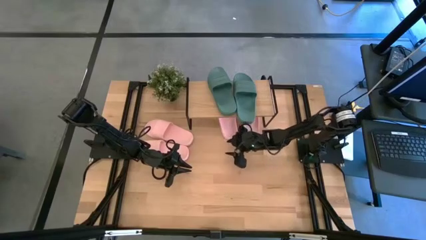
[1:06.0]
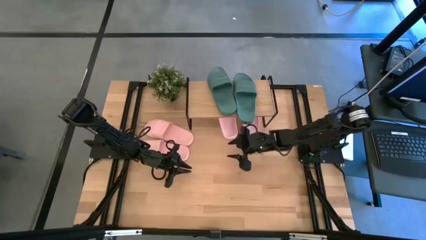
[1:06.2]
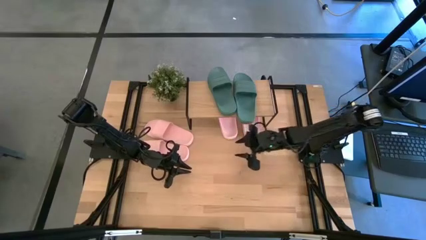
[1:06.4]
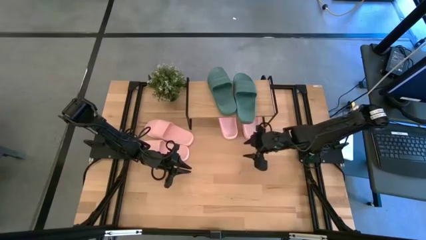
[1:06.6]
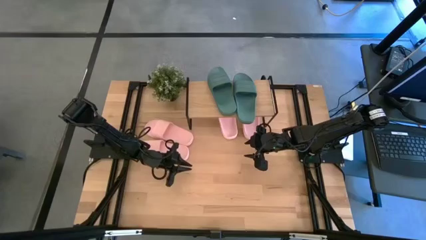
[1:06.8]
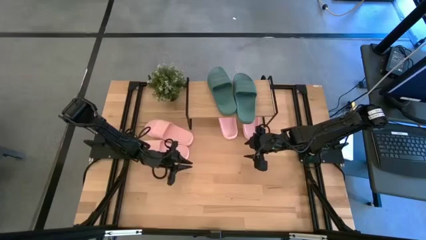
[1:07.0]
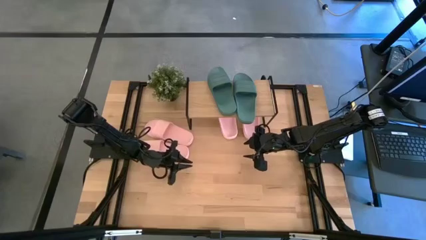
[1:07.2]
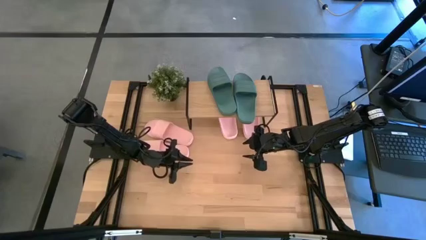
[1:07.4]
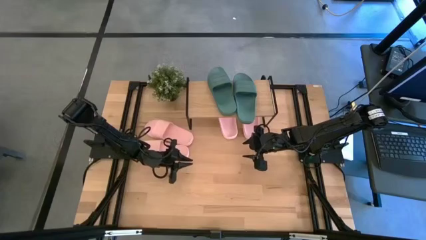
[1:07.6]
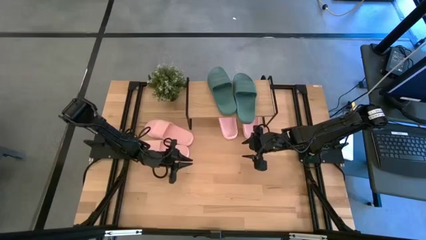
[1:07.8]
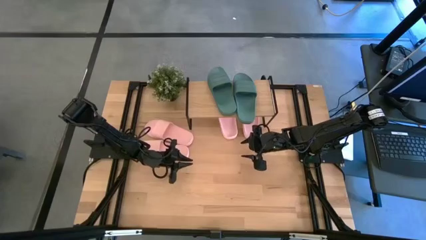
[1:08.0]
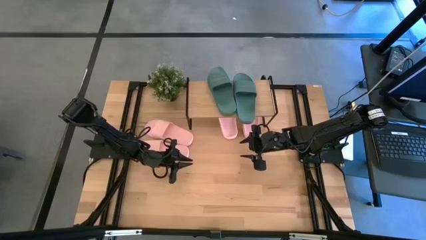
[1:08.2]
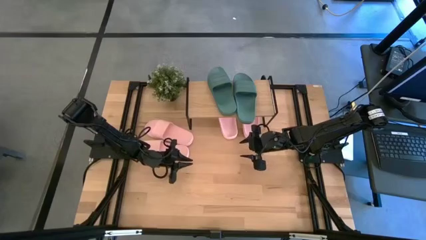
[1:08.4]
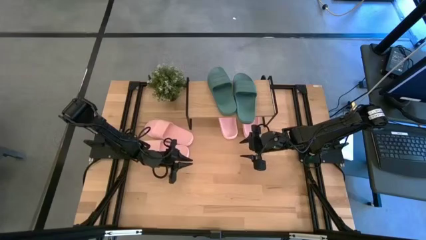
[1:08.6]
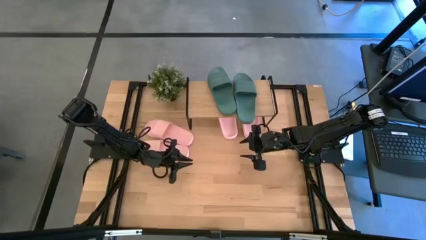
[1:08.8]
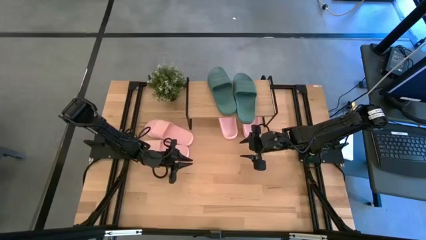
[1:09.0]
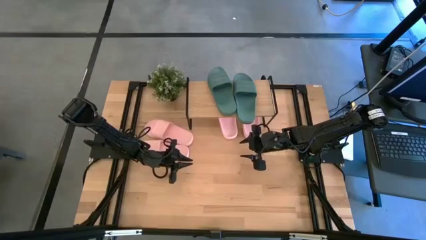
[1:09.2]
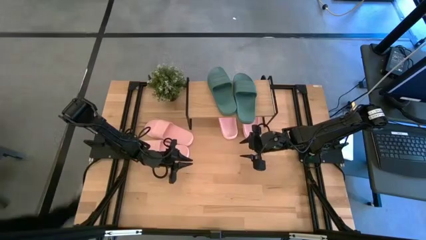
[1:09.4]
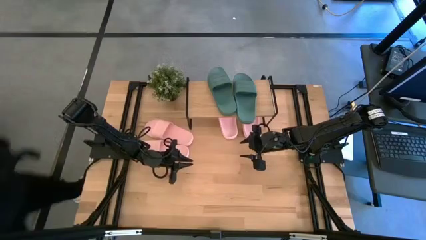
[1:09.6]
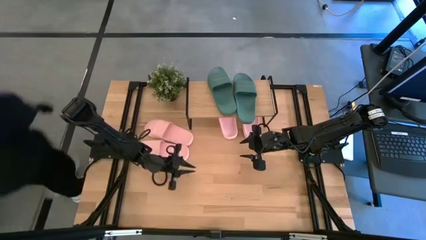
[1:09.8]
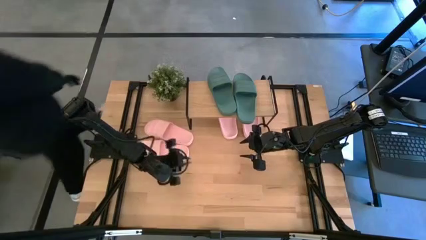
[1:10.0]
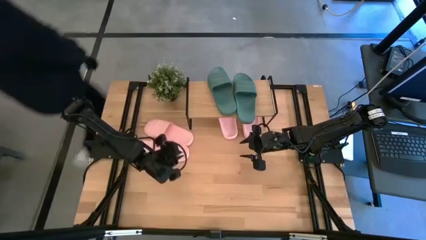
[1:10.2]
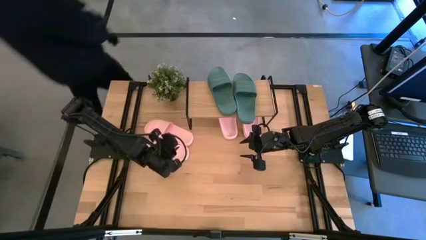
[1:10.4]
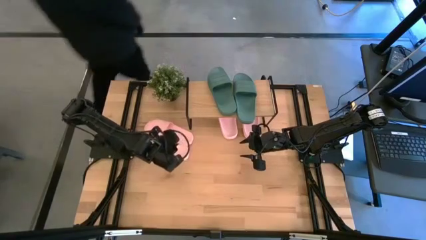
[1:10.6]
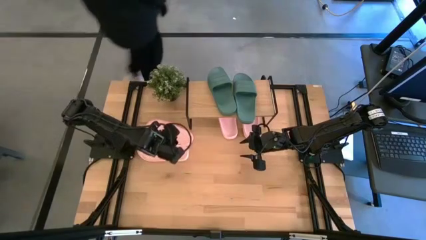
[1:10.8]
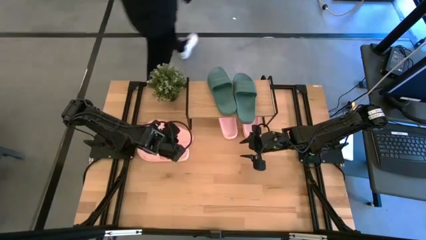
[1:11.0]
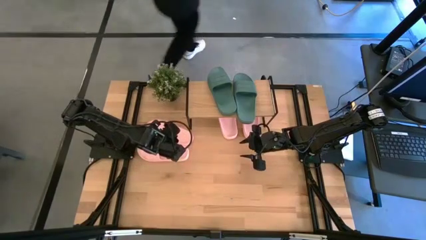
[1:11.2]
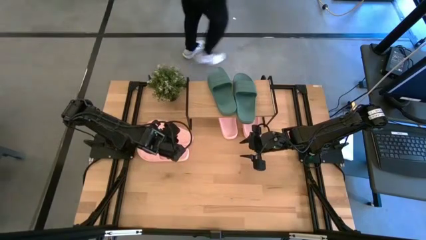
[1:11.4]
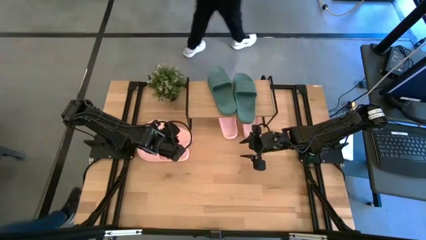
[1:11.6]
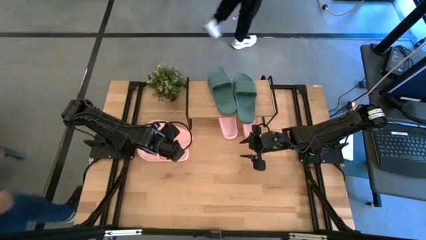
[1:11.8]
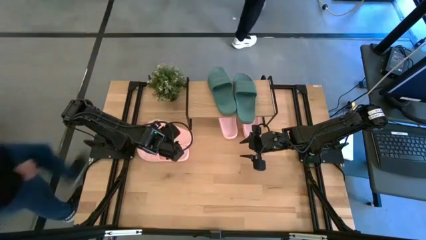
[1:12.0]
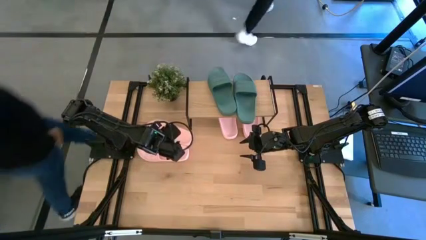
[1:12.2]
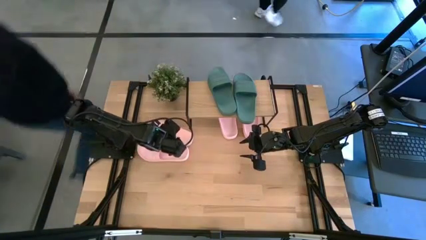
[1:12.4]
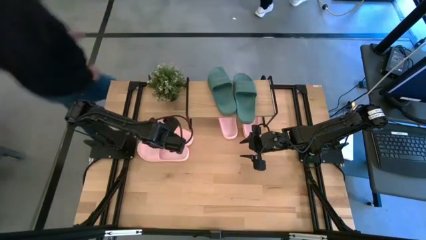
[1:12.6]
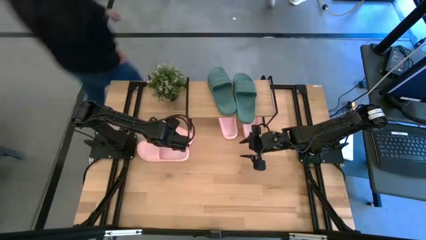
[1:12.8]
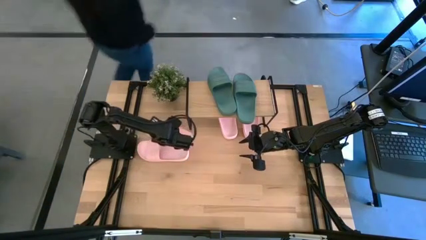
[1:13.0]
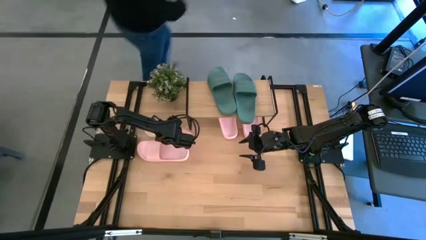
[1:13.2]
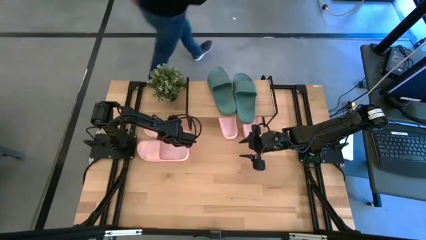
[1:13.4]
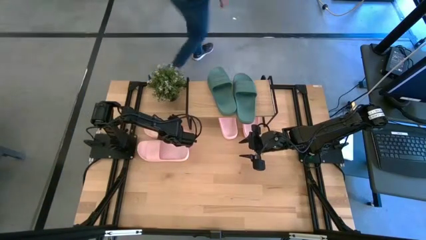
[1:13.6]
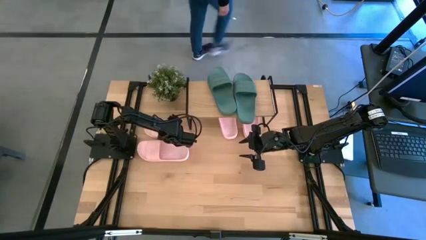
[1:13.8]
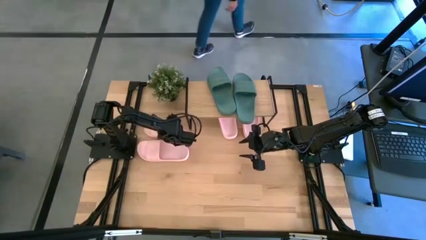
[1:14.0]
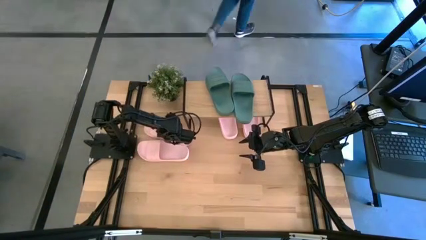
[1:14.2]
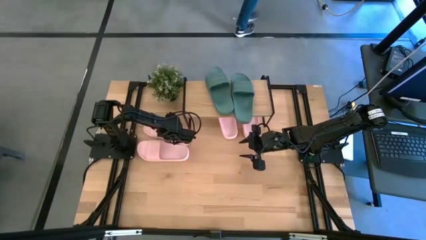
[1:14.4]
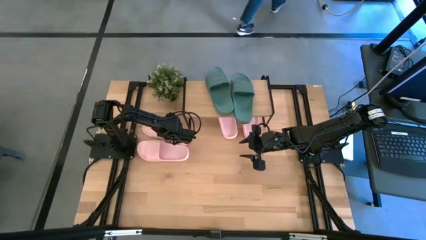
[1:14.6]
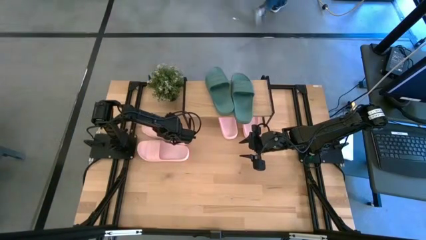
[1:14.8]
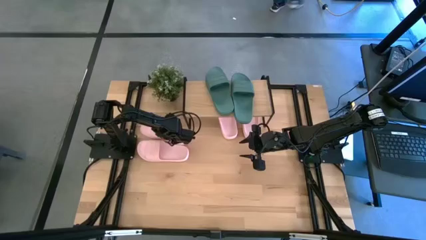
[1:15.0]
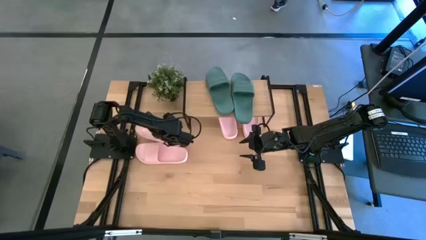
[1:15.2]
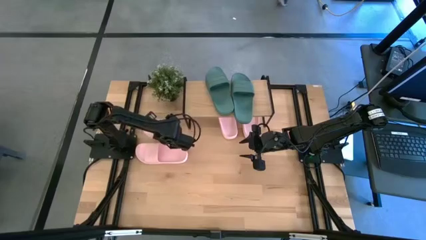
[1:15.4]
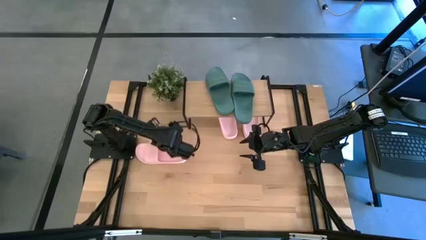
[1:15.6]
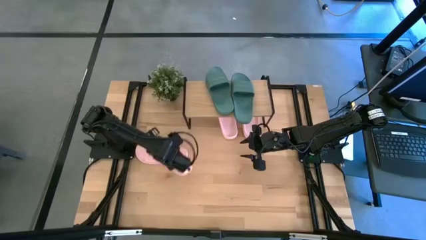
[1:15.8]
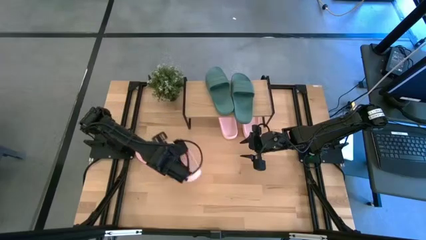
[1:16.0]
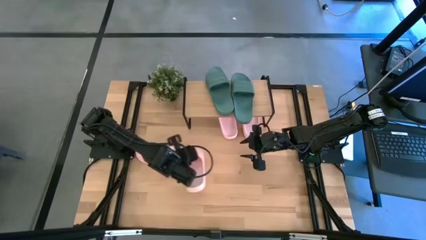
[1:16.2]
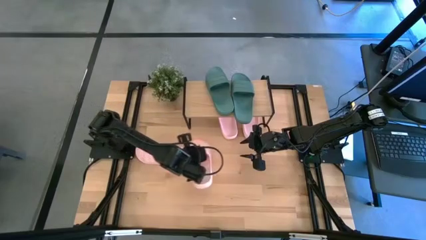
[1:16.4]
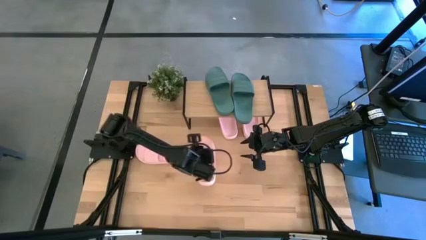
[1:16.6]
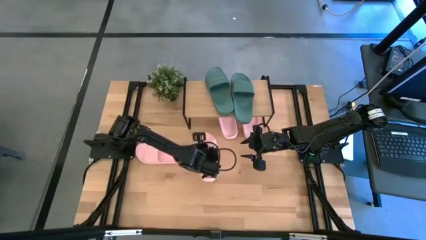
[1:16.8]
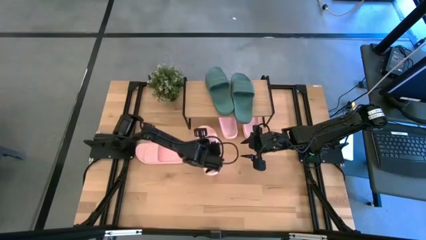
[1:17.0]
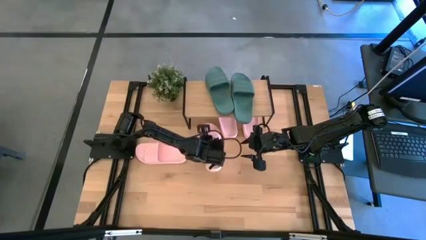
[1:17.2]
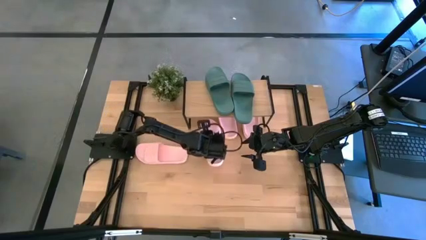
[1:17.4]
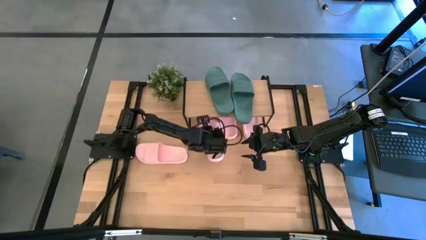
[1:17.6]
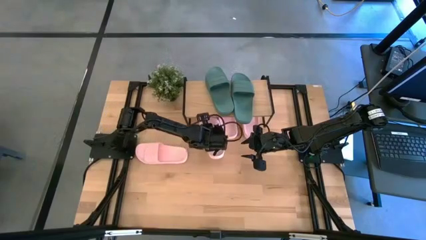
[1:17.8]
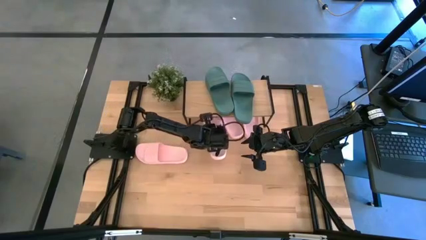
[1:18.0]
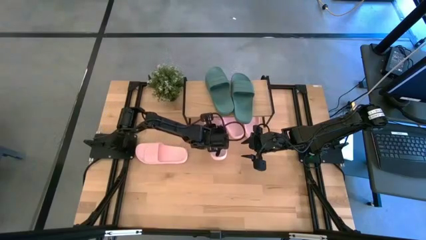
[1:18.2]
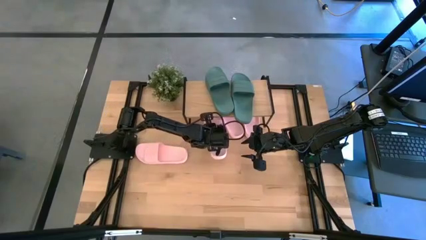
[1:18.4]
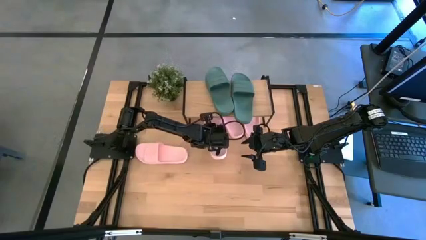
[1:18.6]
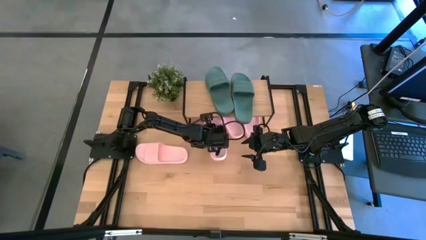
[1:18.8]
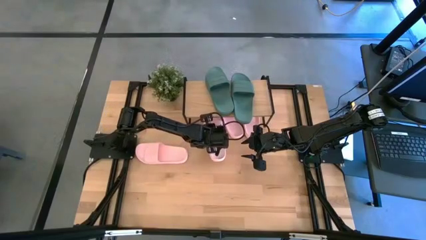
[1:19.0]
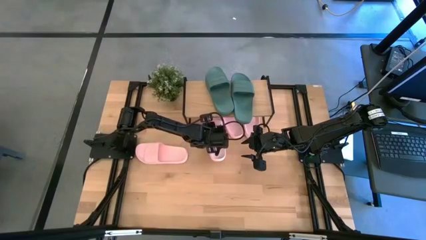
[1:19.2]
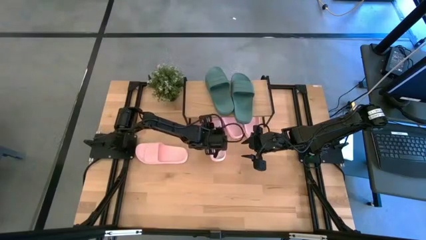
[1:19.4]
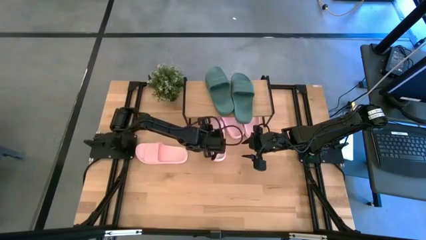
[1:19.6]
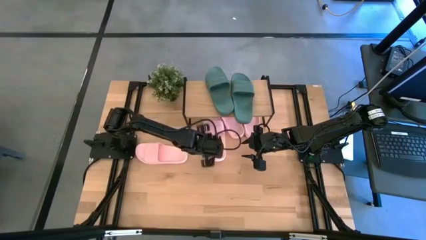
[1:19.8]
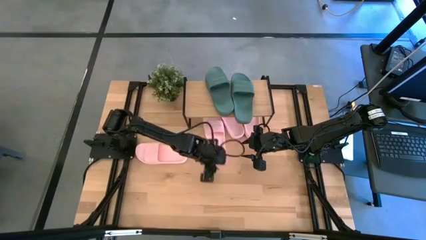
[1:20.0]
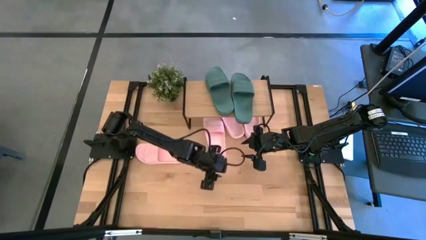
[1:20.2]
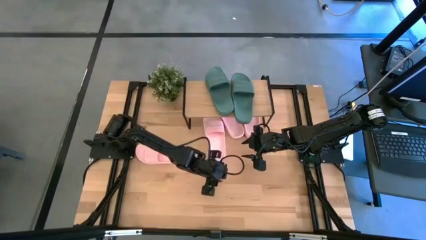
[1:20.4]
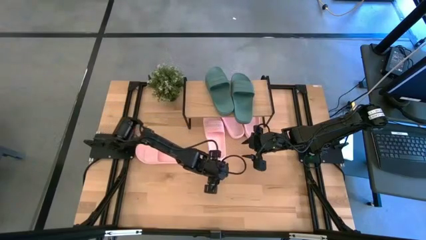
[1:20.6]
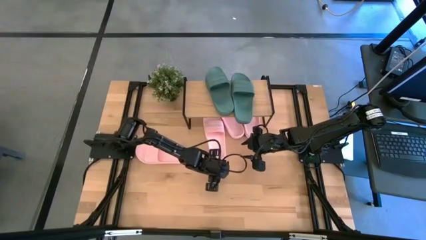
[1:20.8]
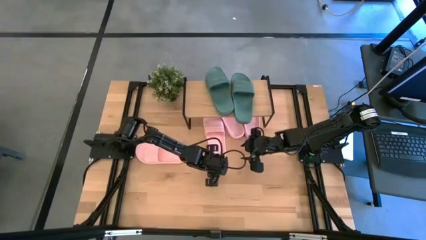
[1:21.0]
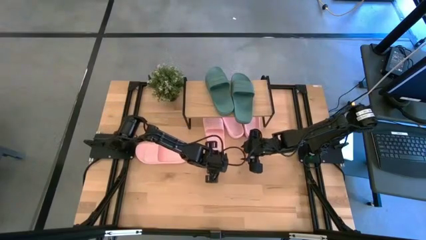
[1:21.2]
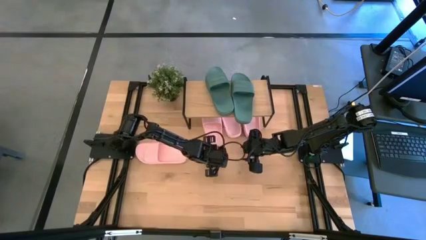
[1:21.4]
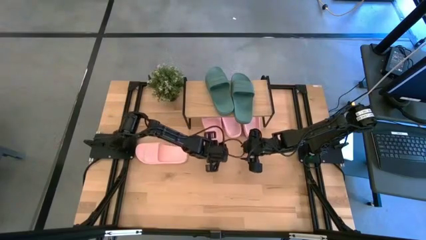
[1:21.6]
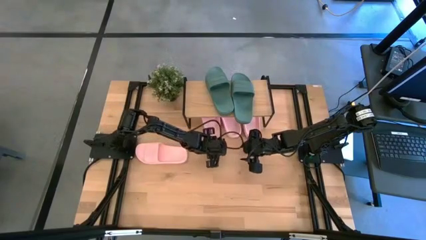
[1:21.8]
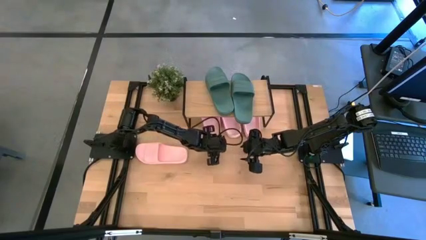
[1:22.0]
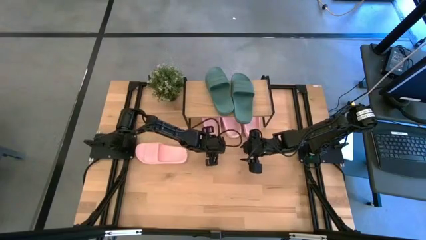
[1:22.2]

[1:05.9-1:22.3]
Task: Pick and place slides into the shelf
Put the pink slipper under the shelf
